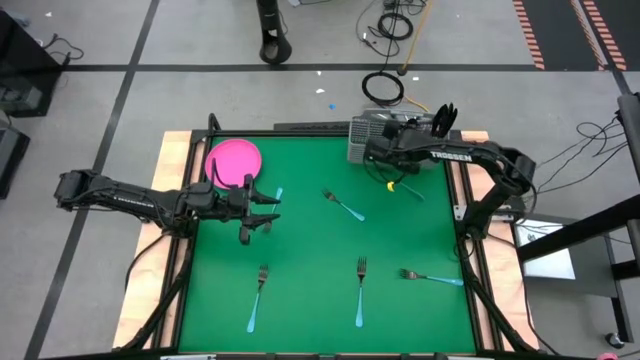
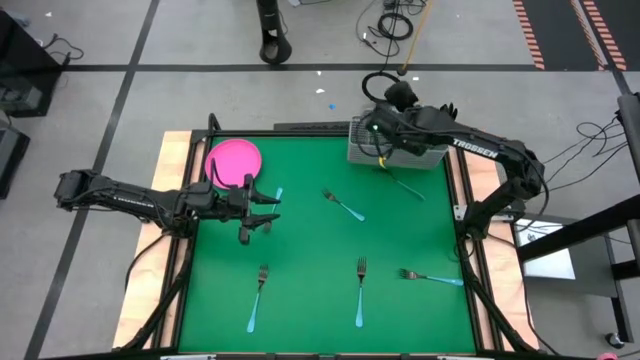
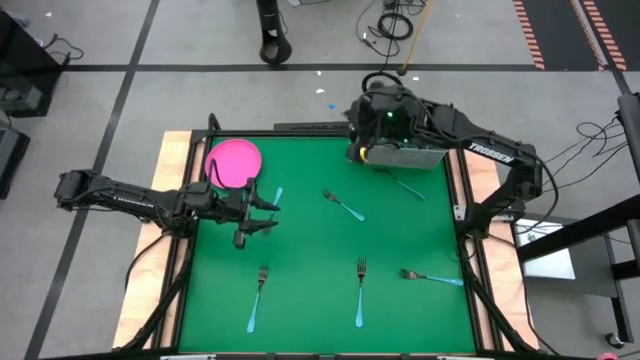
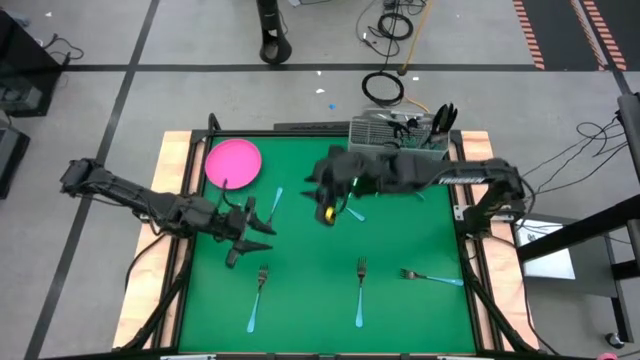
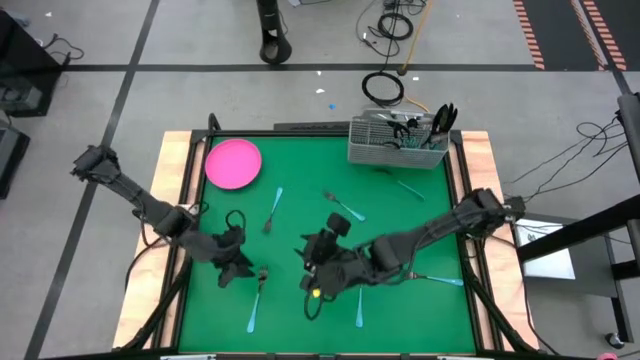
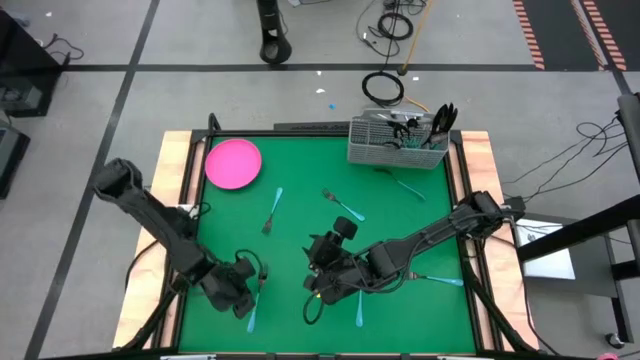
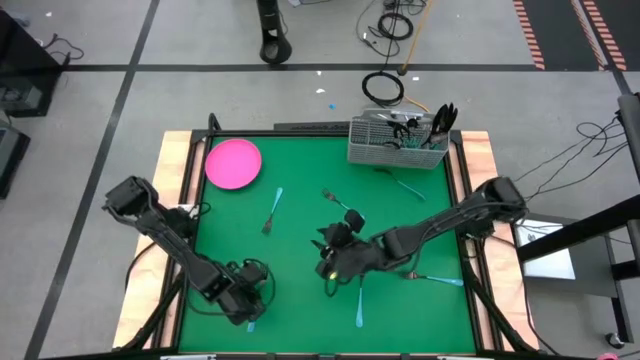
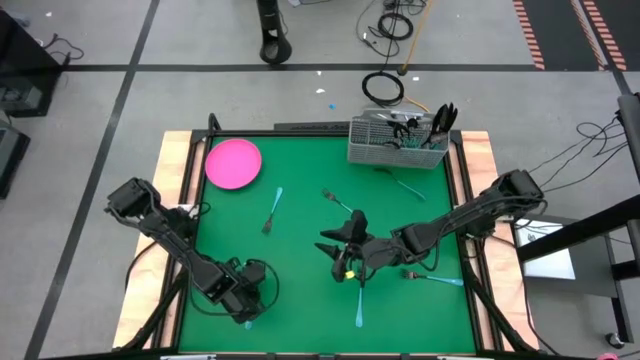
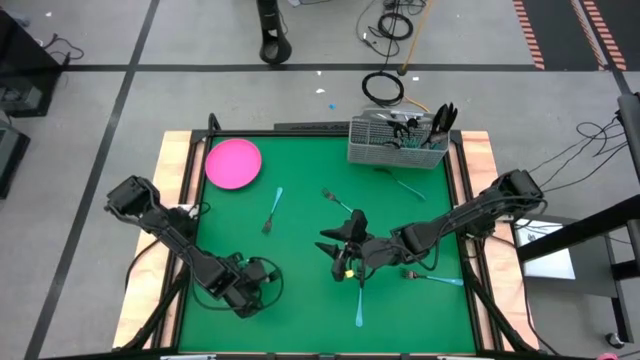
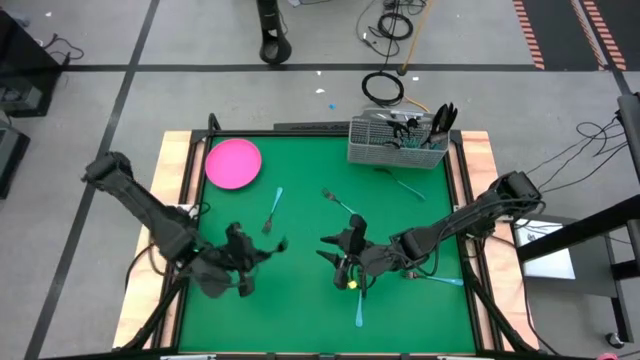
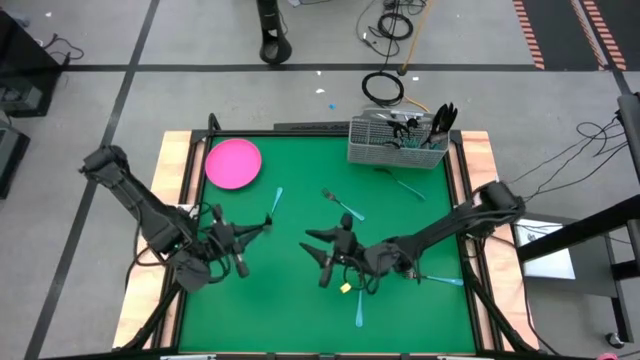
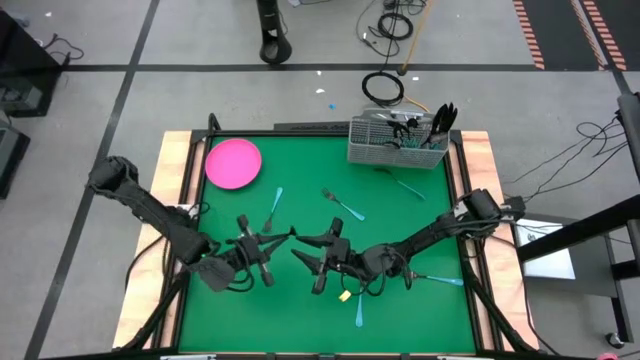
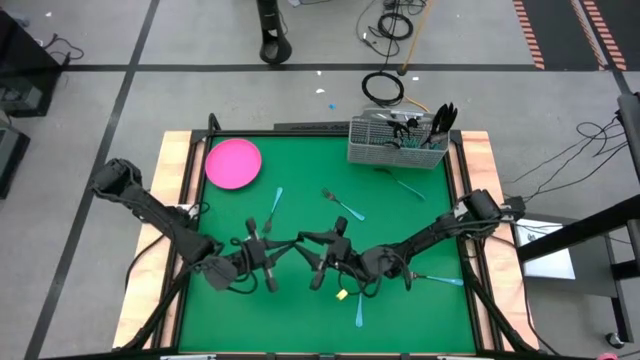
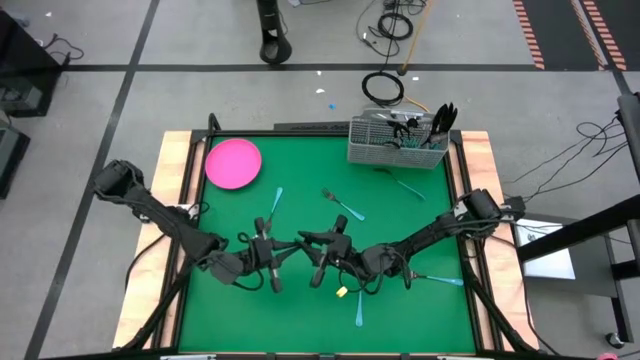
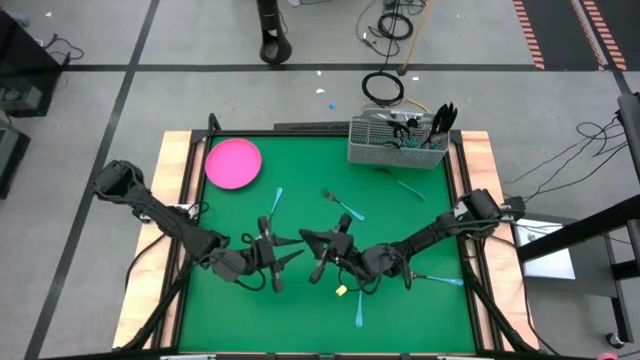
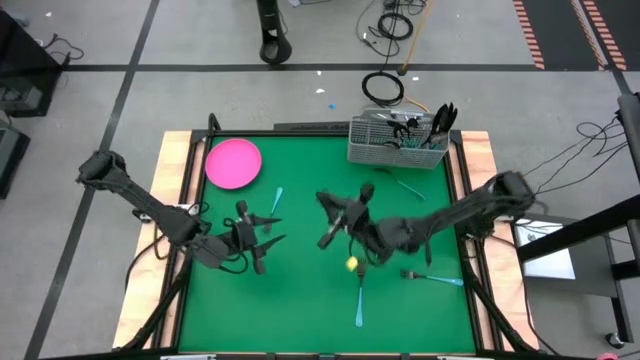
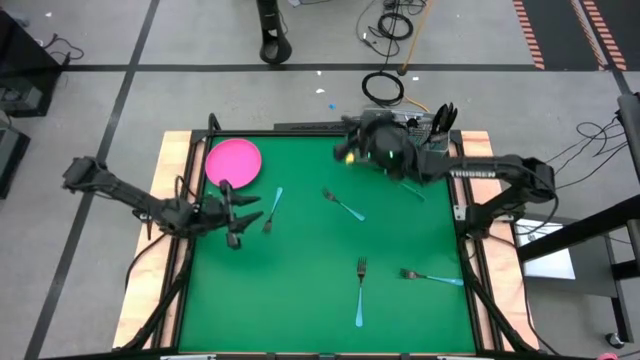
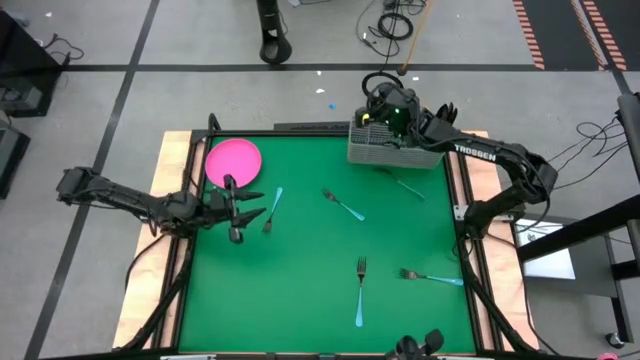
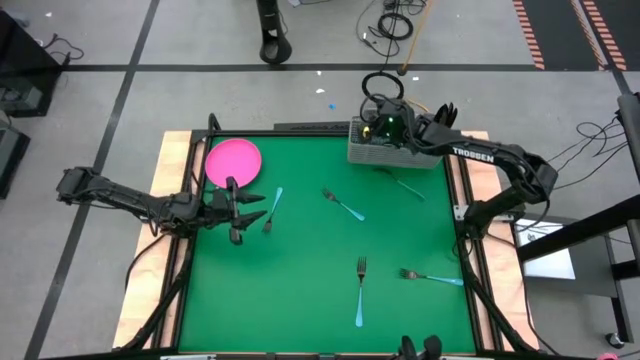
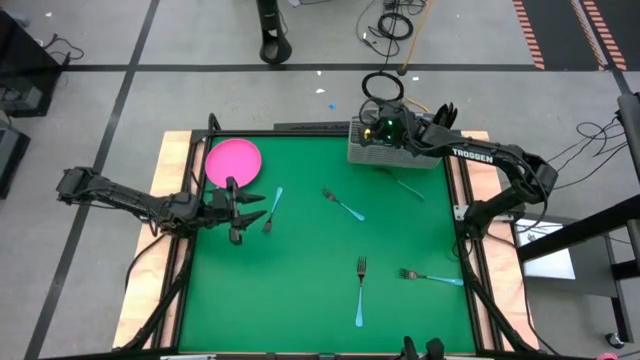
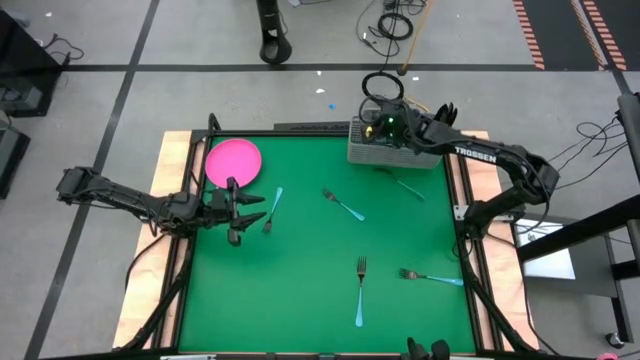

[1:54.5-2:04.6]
Task: Sort silverware
Put the blue fork into the gray silverware basket

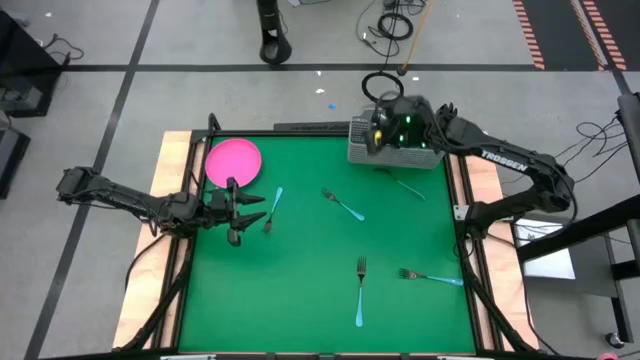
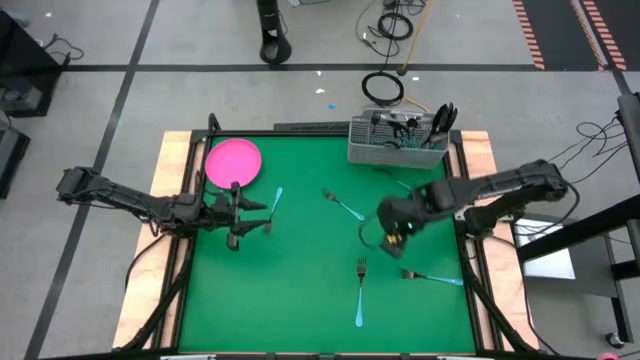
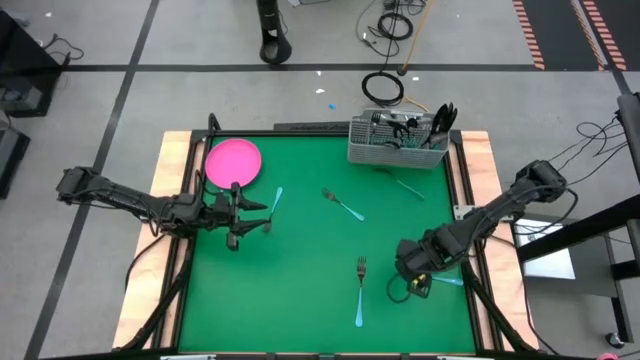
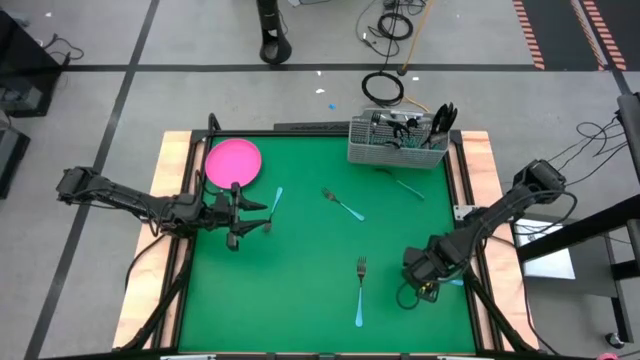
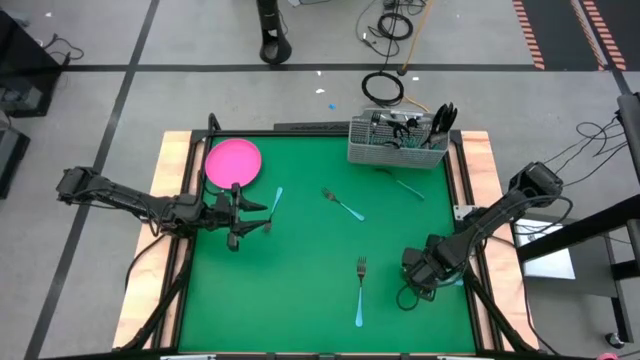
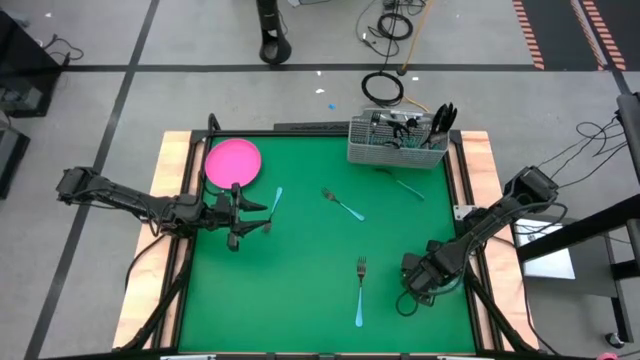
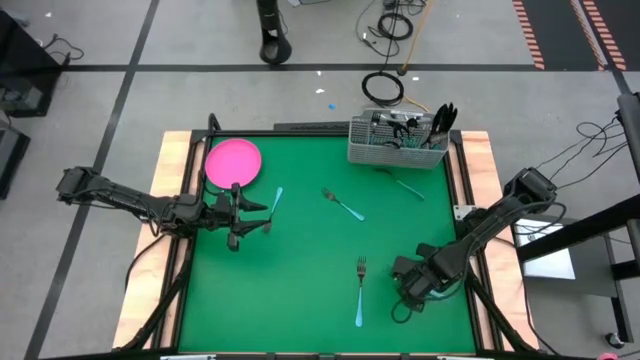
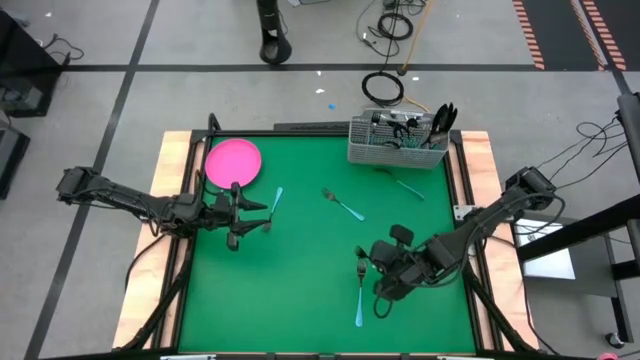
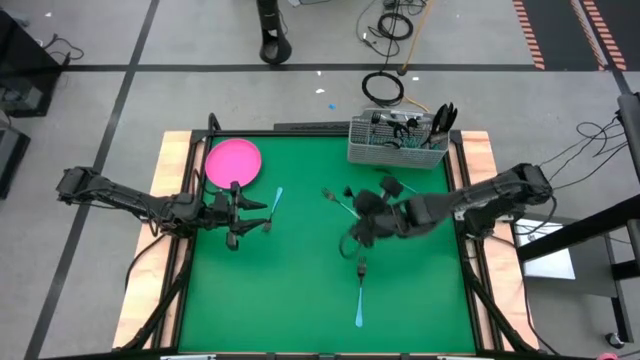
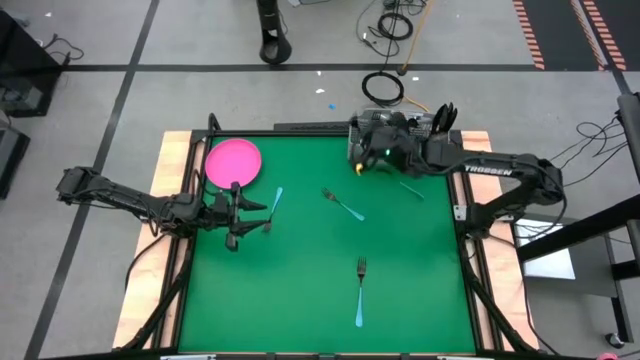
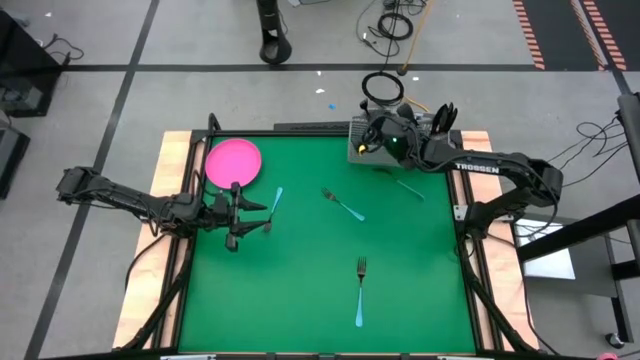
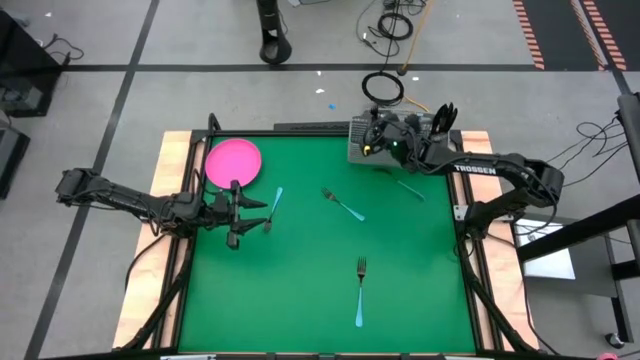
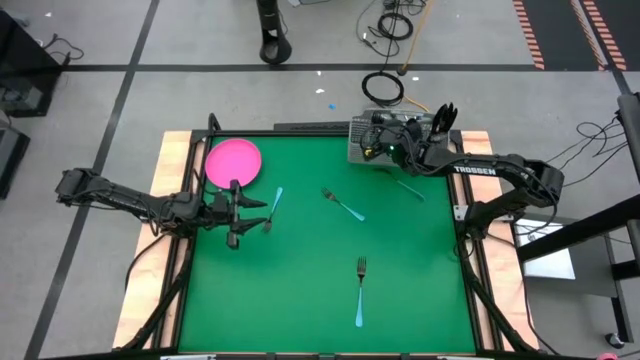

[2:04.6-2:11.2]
Put the blue fork into the gray silverware basket

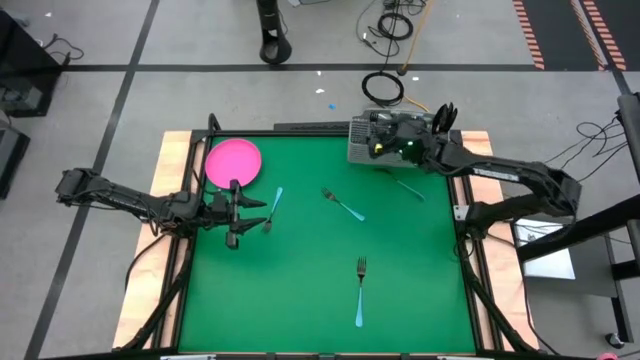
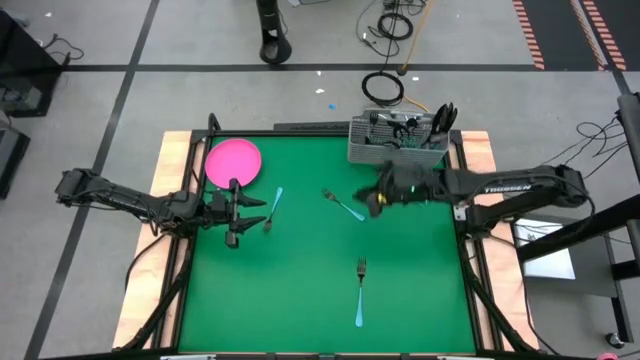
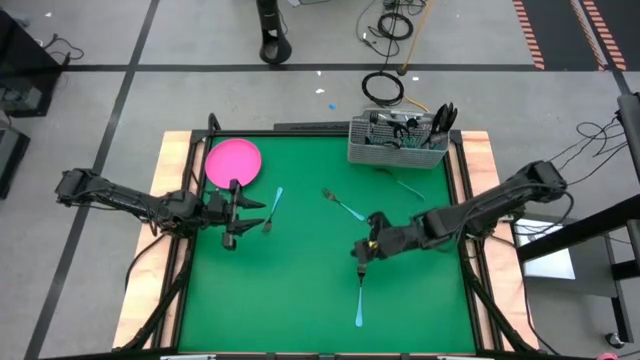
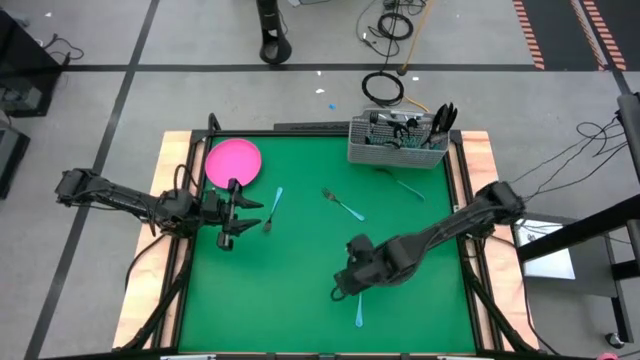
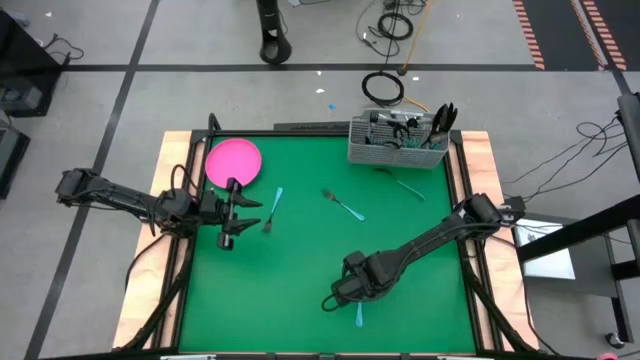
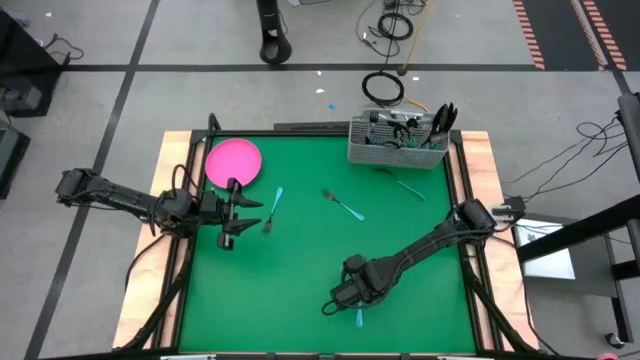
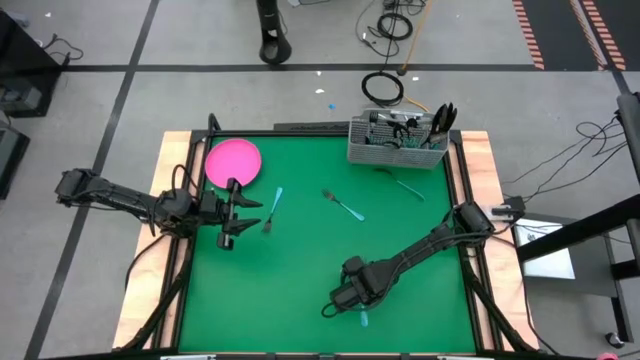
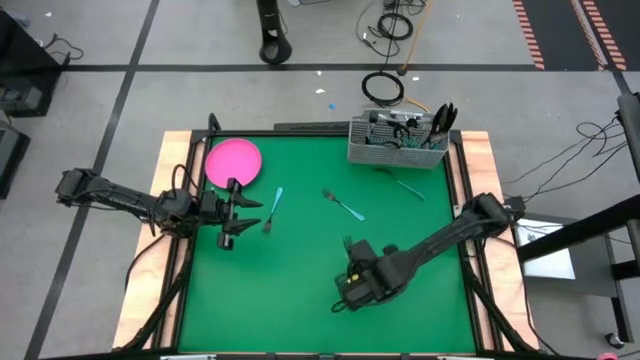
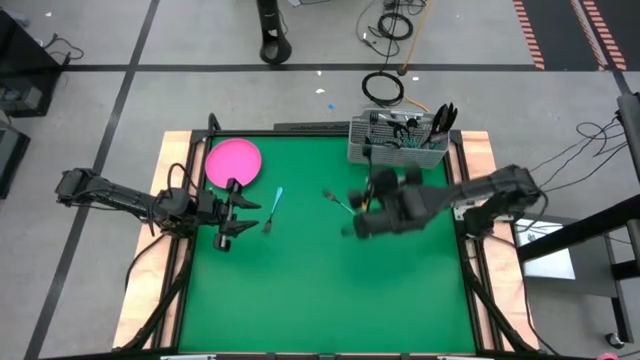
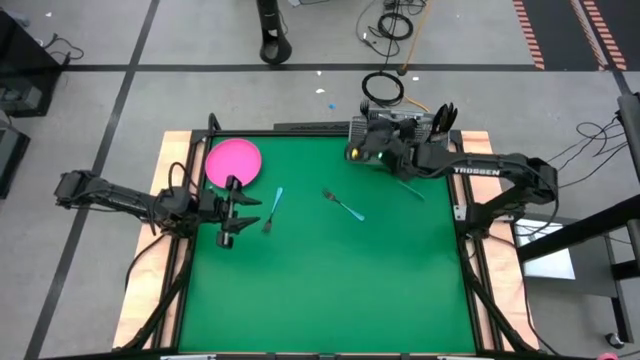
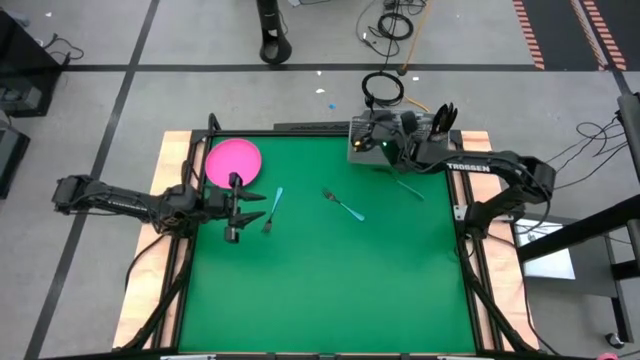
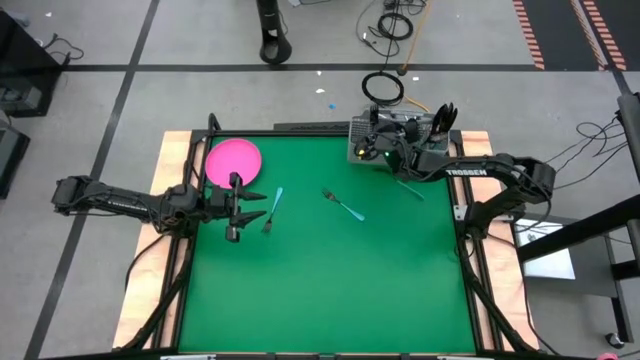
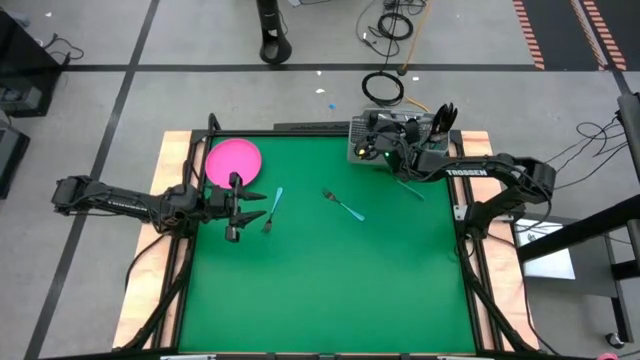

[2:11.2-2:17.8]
Put the blue fork into the gray silverware basket
